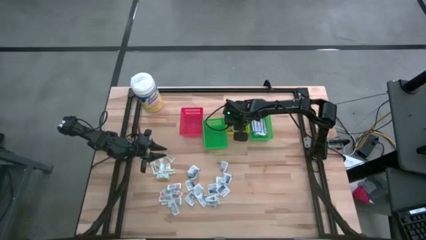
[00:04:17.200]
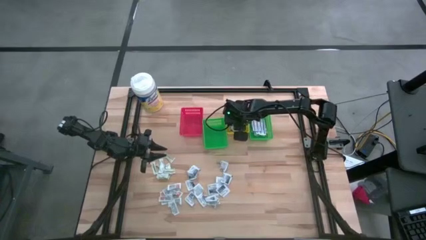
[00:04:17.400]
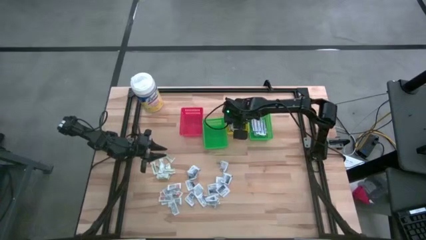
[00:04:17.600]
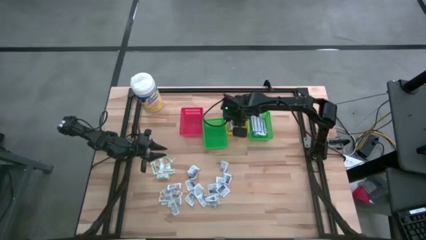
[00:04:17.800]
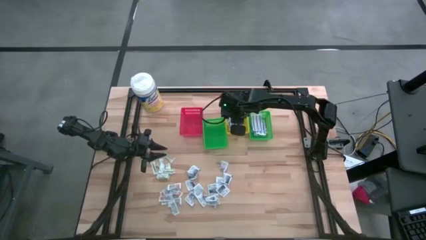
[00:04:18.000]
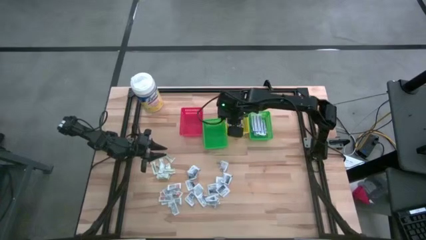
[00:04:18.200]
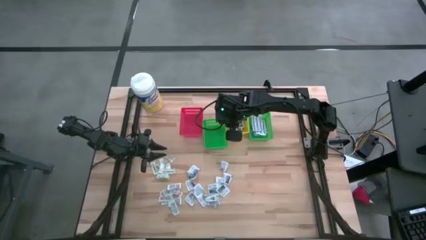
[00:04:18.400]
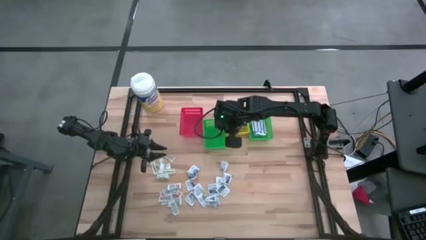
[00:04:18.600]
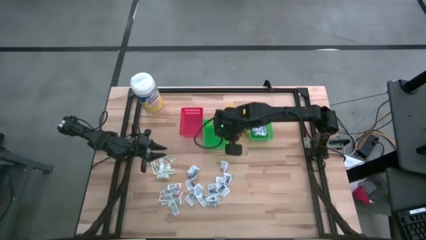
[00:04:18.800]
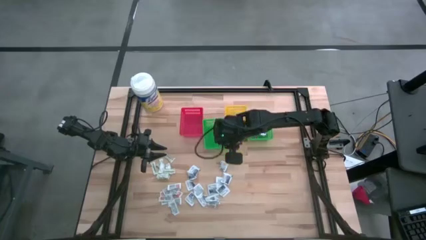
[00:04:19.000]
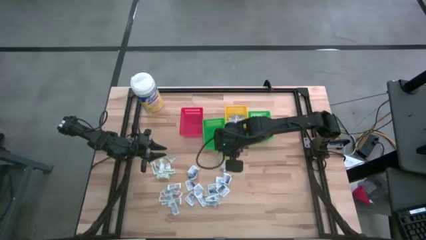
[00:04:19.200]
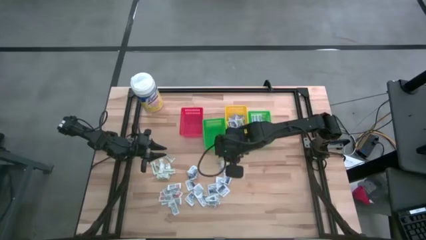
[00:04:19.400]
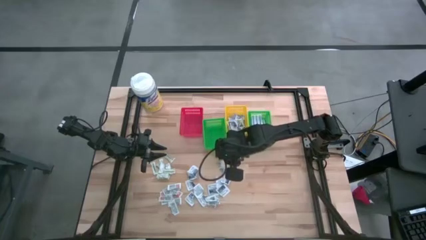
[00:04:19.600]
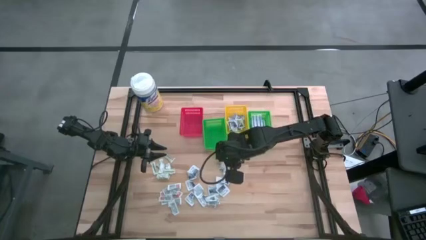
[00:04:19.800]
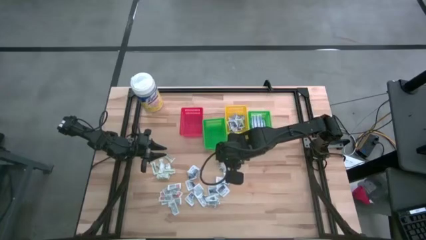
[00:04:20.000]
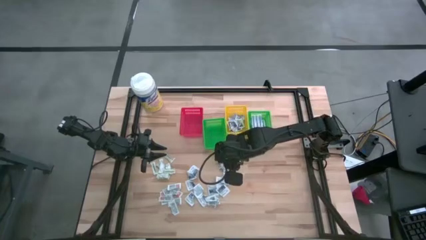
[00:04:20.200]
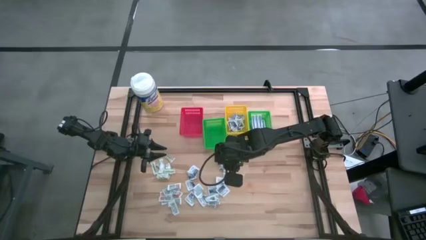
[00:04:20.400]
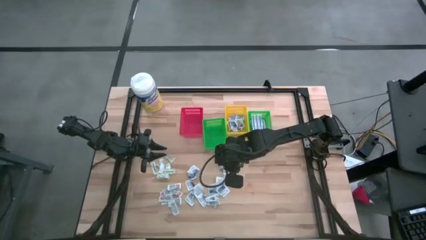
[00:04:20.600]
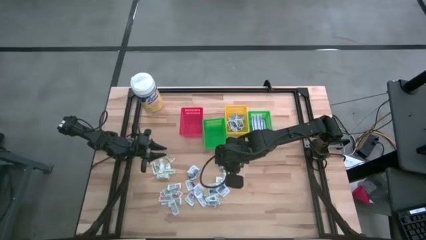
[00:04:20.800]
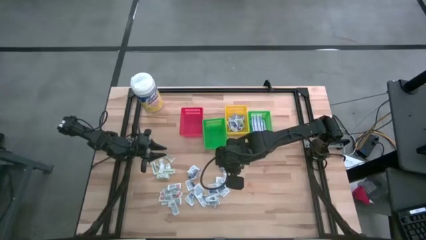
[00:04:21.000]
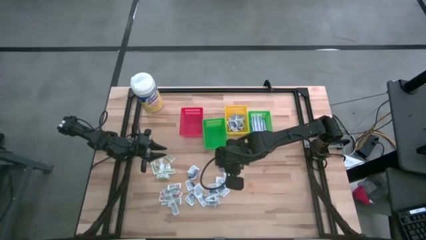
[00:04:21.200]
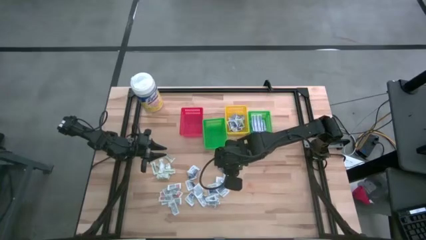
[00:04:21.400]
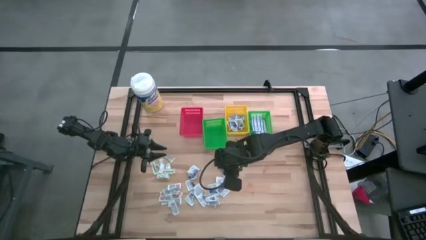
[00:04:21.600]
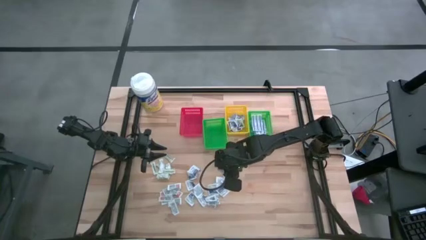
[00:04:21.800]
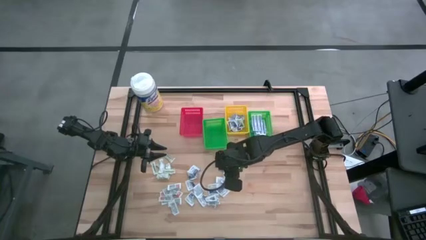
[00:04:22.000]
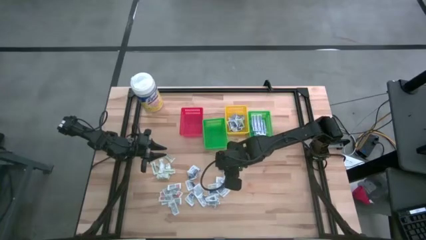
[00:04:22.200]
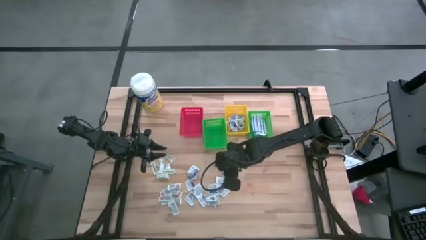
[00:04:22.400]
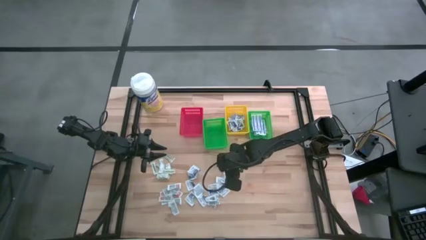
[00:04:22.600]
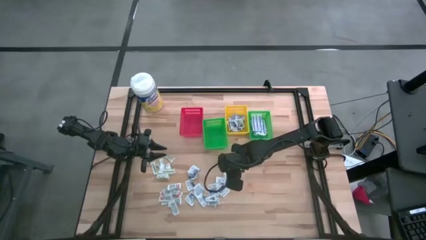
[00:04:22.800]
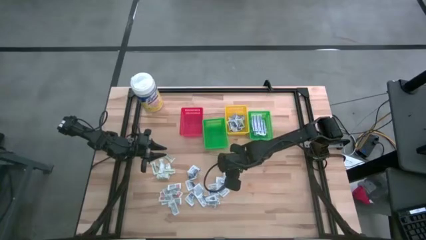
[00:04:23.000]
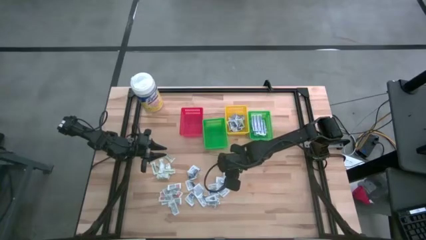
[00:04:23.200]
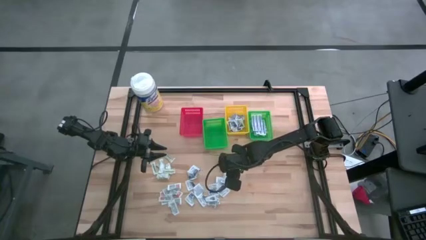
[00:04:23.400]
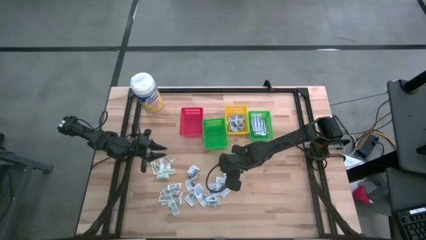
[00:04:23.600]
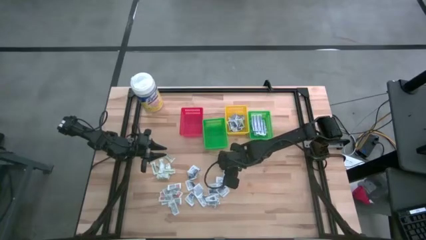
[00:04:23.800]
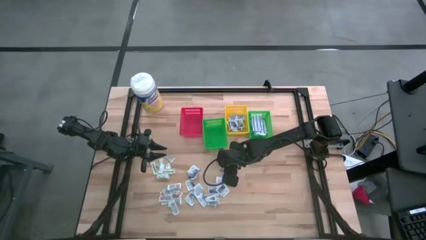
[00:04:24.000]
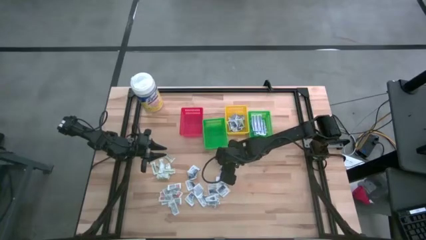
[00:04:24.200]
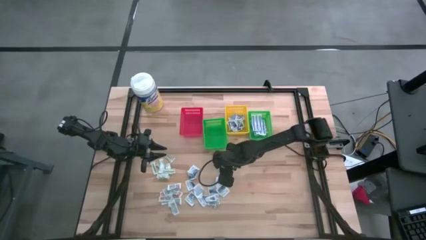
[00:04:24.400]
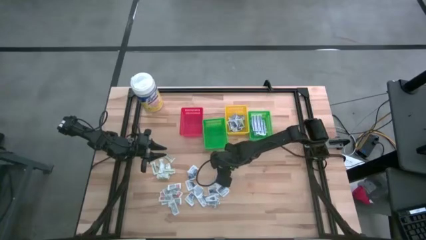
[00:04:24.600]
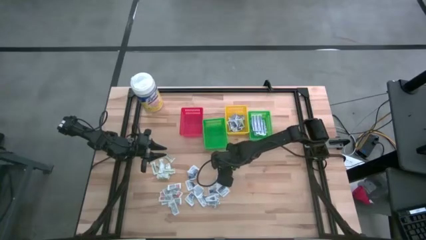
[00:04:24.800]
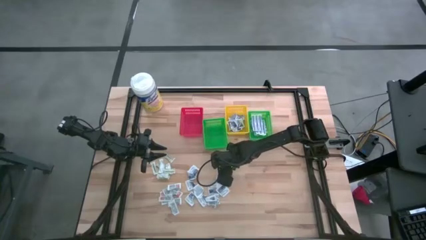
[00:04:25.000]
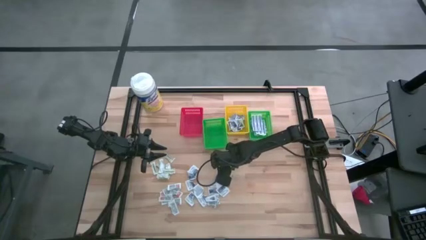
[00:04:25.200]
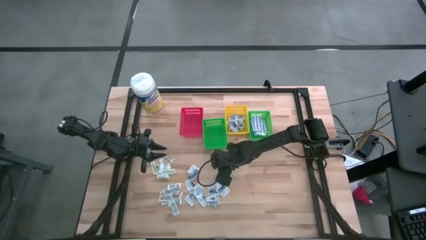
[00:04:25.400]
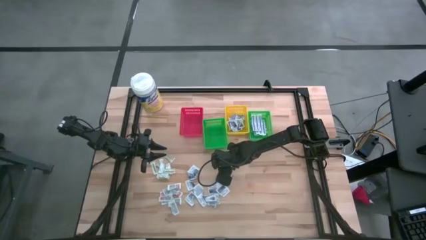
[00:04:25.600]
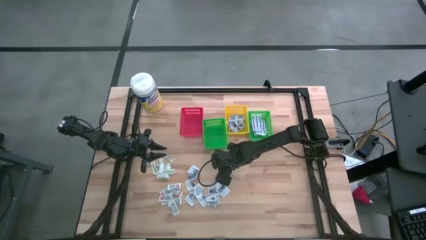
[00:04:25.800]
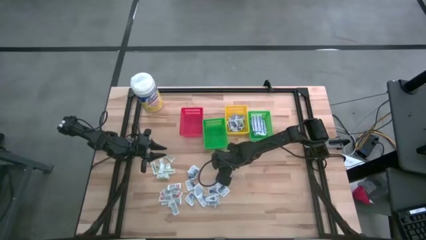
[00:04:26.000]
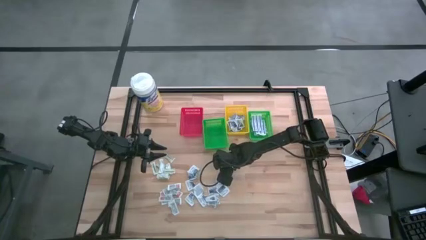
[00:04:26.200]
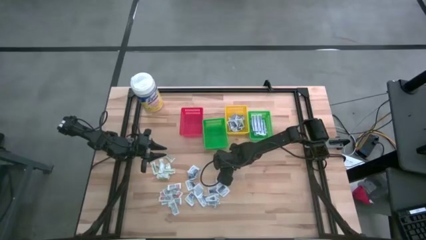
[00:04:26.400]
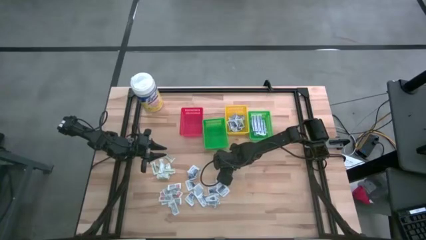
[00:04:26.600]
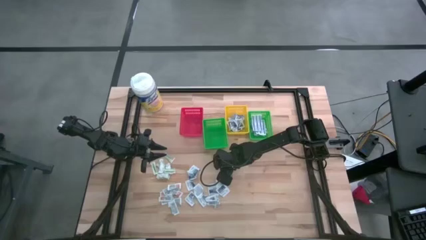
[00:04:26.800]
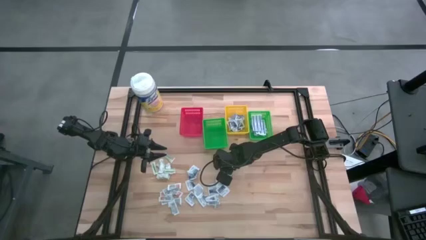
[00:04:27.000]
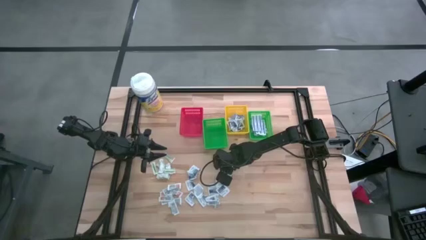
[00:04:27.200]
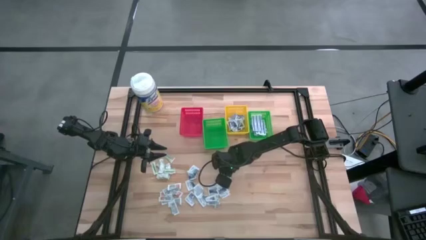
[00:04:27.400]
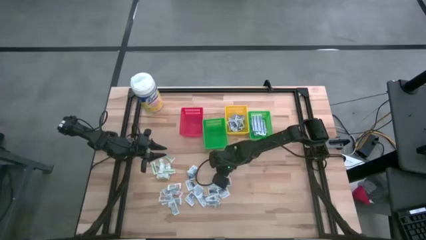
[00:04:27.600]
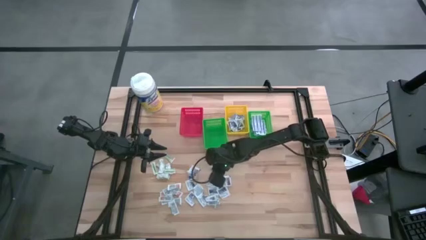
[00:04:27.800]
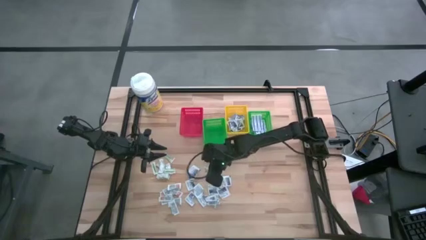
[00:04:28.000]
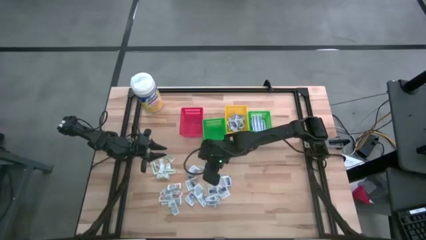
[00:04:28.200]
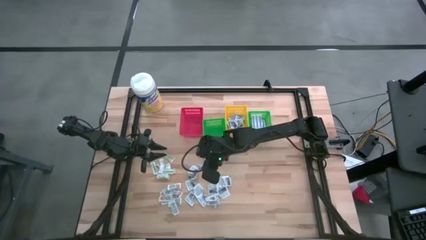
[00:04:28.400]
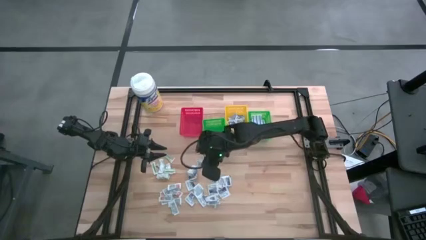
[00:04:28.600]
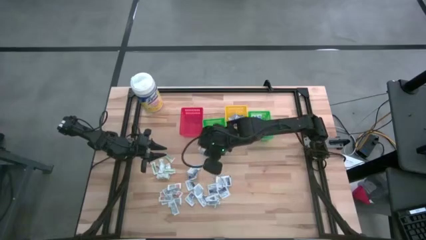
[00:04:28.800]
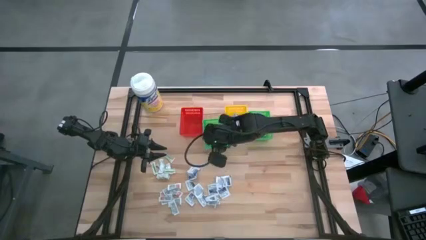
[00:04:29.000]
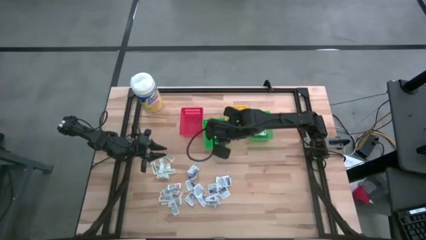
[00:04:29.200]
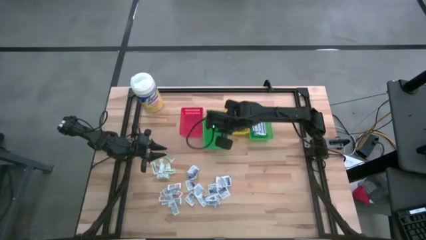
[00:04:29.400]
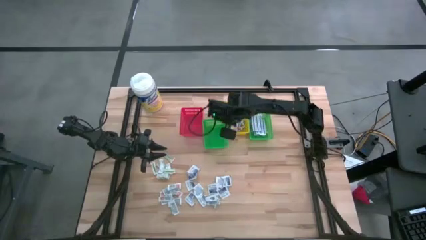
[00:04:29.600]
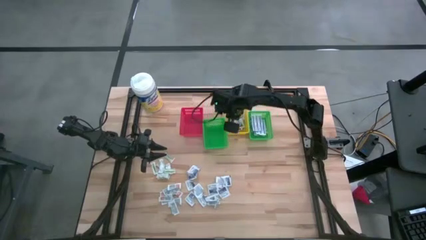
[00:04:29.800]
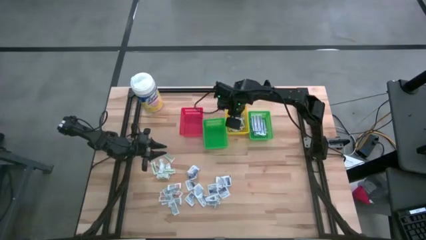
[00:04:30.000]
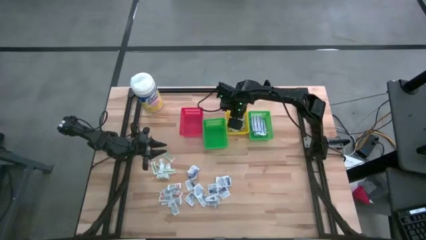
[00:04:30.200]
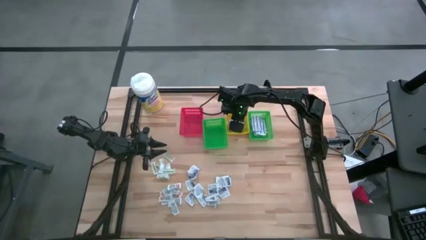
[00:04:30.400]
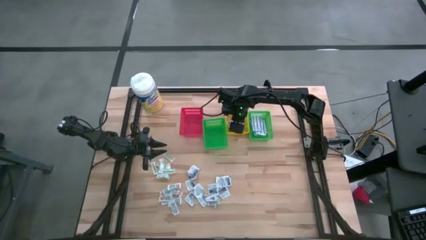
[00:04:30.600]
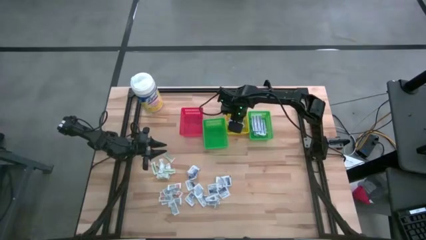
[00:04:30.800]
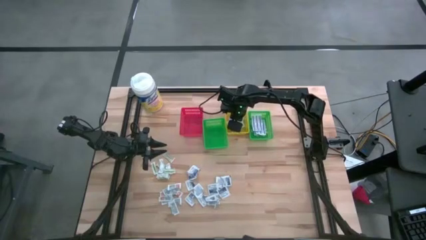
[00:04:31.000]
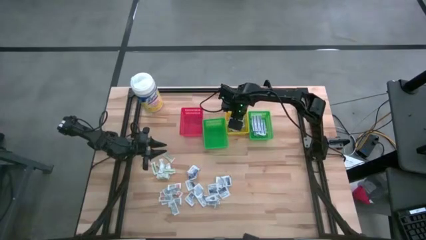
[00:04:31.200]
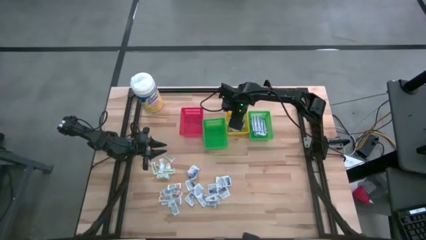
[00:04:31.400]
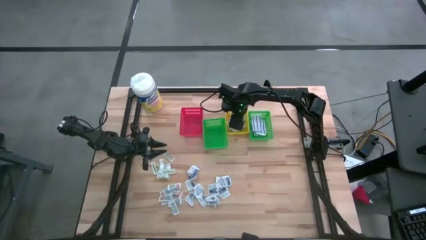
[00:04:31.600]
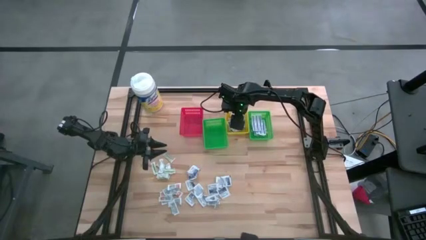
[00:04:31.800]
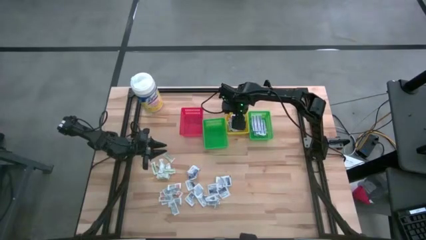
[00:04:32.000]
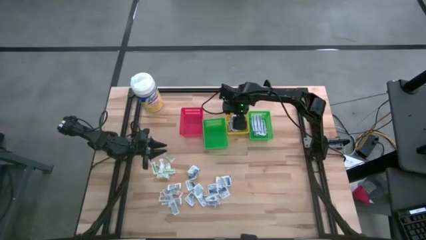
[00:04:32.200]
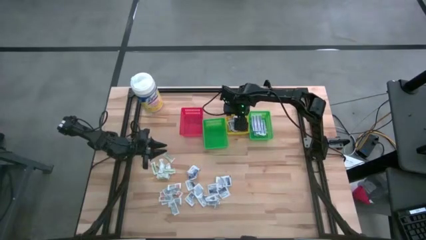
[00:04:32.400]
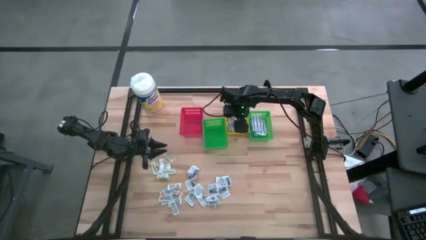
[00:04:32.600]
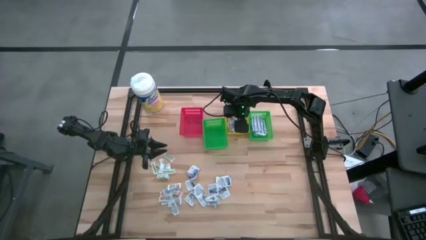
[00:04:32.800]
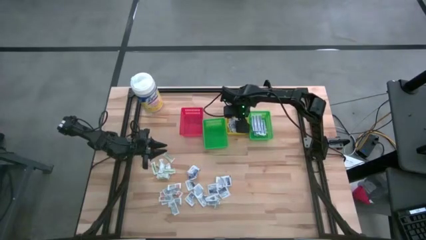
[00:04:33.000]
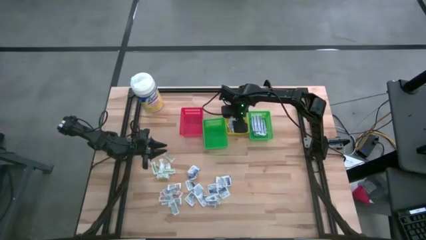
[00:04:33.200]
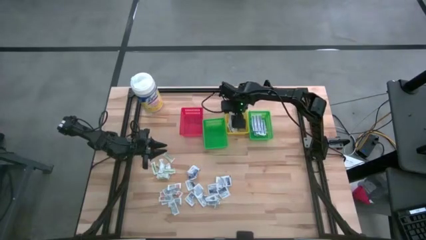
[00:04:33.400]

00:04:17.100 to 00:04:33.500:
Task: Pick & Place First Aid Supplies
Put the alcohol pad into the yellow basket
